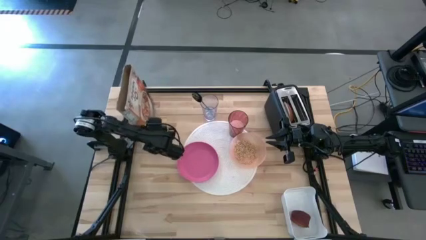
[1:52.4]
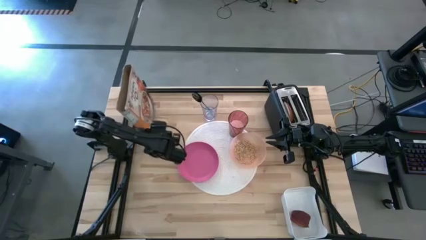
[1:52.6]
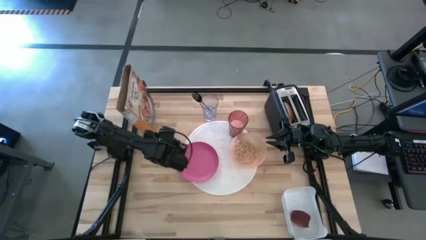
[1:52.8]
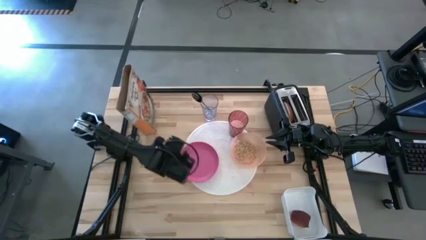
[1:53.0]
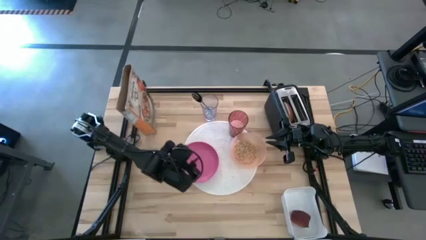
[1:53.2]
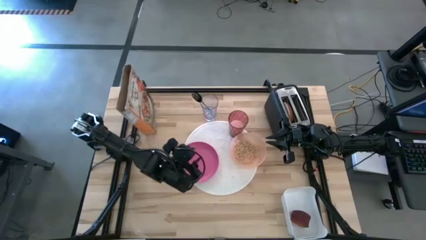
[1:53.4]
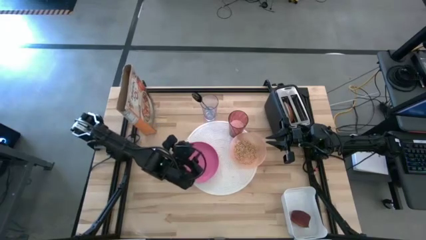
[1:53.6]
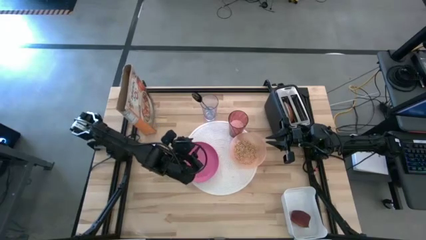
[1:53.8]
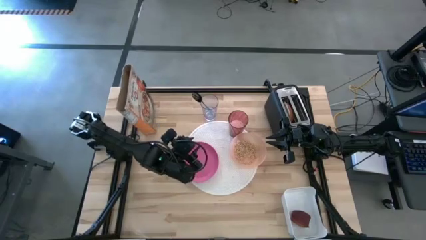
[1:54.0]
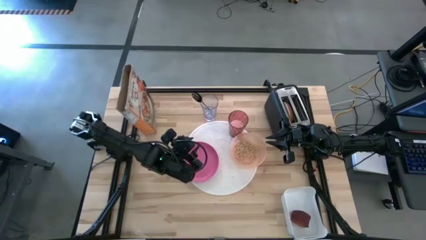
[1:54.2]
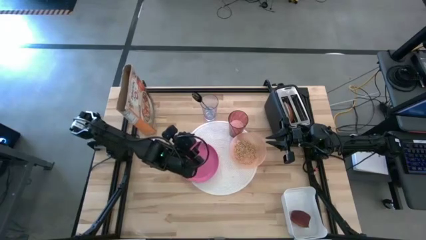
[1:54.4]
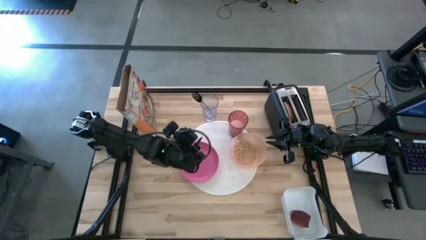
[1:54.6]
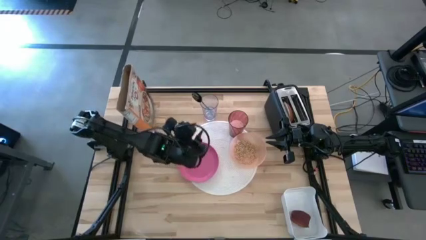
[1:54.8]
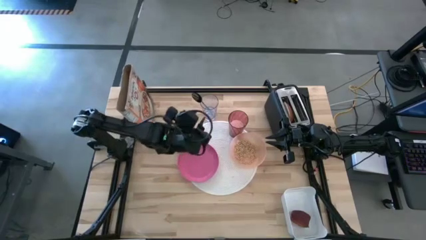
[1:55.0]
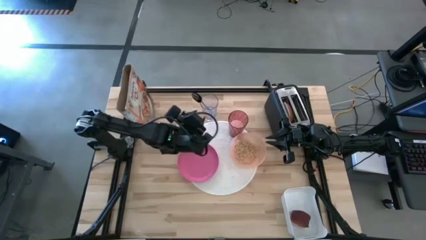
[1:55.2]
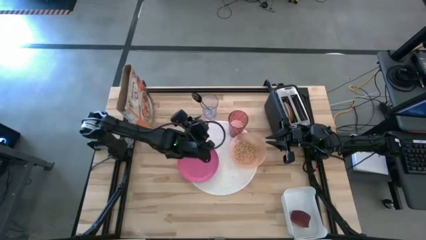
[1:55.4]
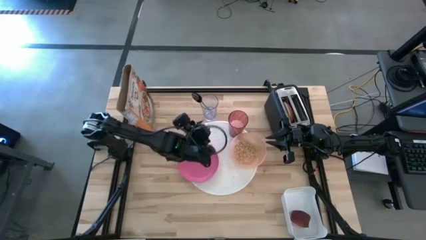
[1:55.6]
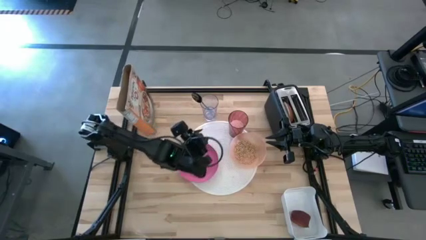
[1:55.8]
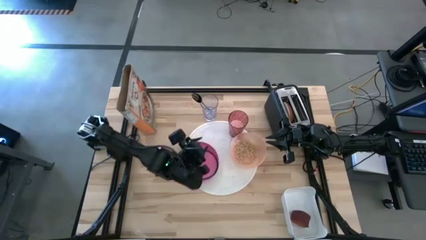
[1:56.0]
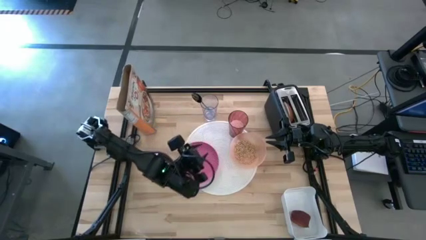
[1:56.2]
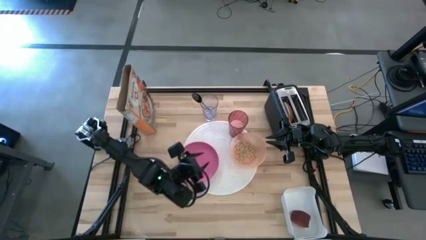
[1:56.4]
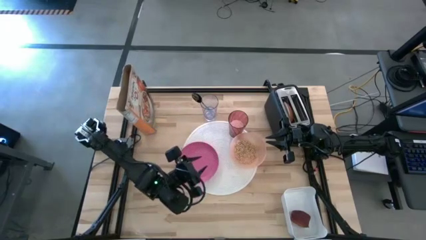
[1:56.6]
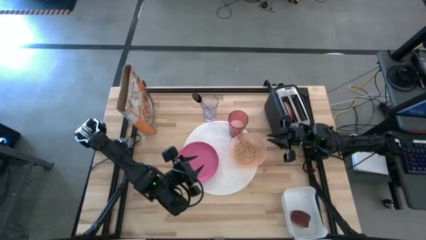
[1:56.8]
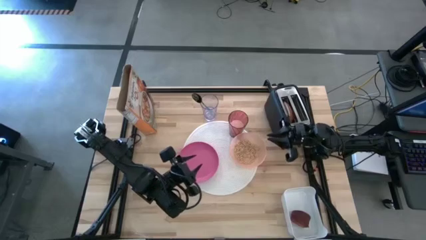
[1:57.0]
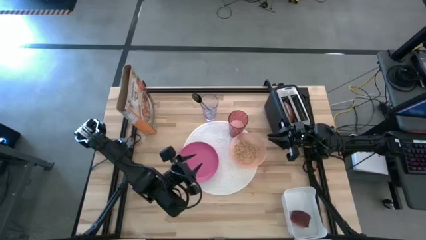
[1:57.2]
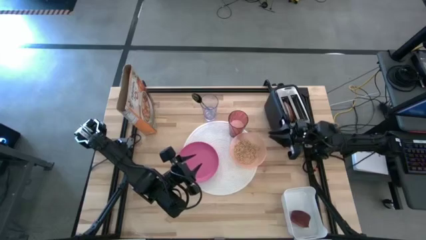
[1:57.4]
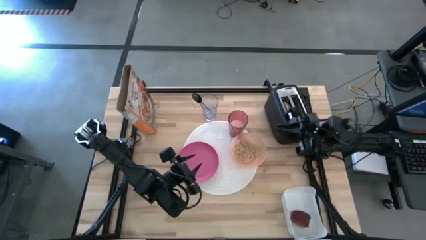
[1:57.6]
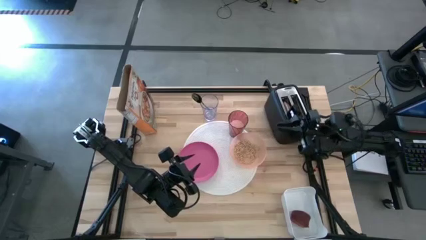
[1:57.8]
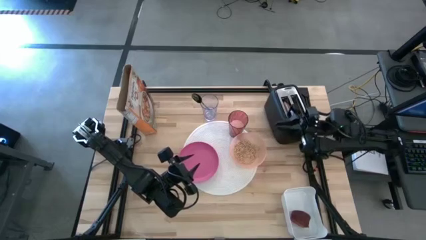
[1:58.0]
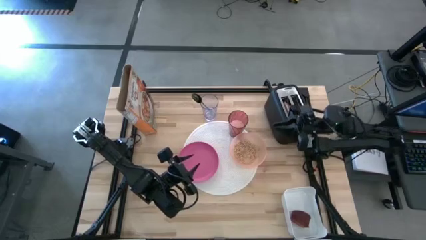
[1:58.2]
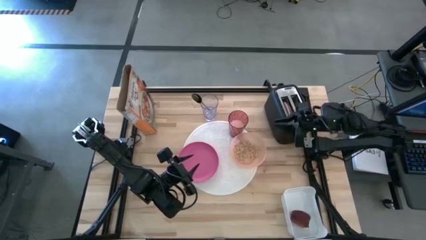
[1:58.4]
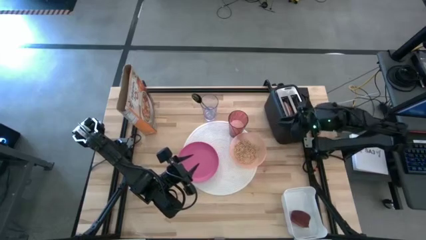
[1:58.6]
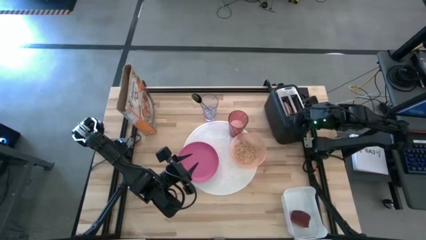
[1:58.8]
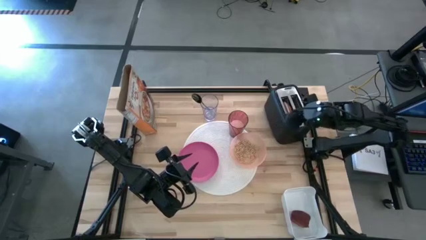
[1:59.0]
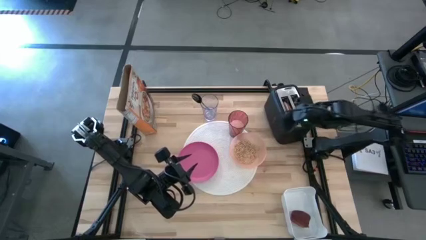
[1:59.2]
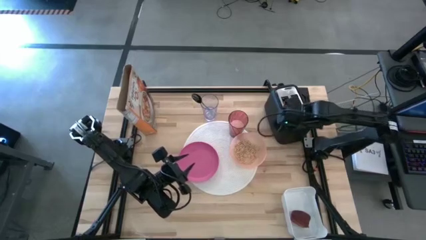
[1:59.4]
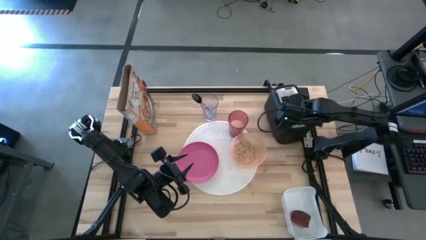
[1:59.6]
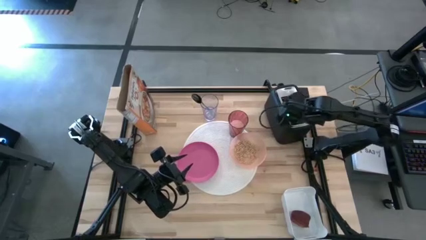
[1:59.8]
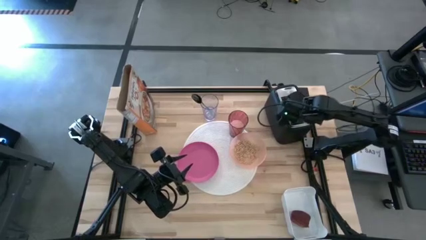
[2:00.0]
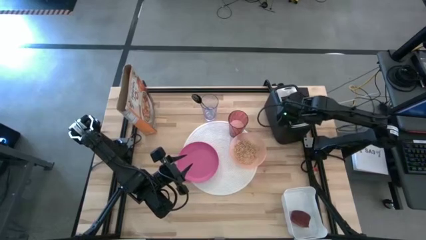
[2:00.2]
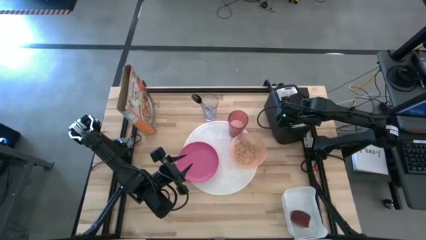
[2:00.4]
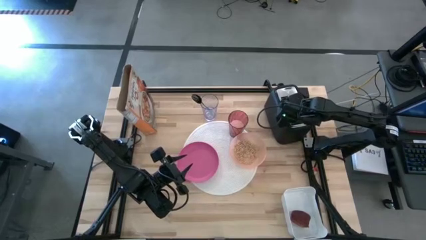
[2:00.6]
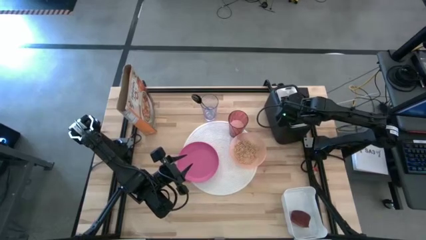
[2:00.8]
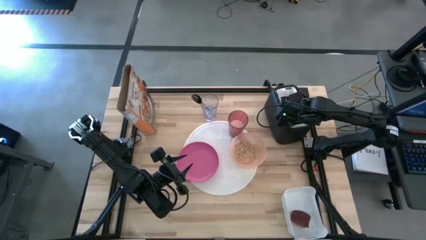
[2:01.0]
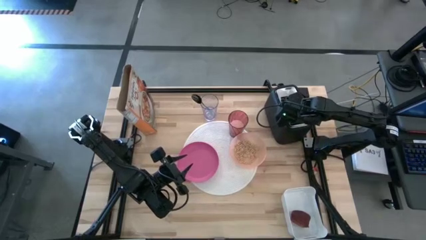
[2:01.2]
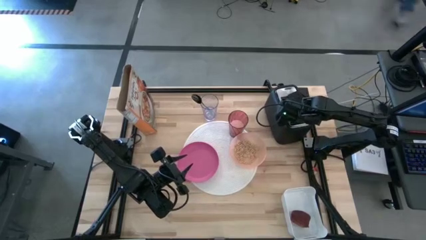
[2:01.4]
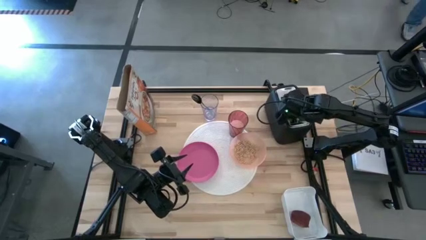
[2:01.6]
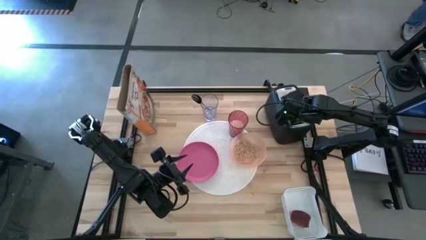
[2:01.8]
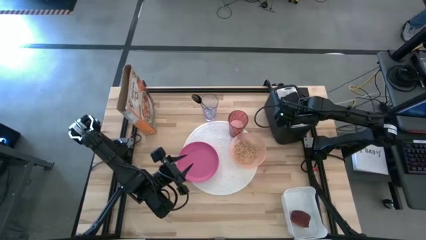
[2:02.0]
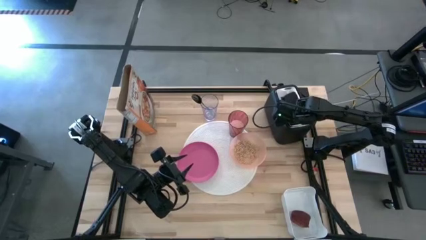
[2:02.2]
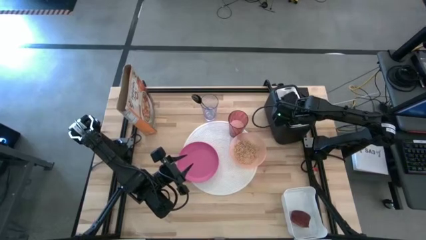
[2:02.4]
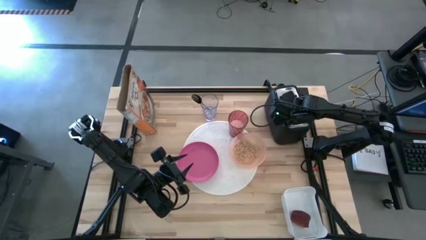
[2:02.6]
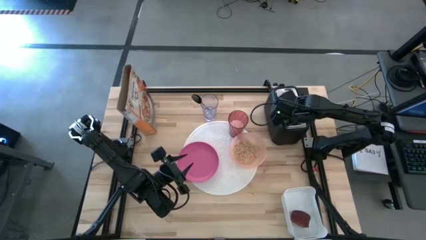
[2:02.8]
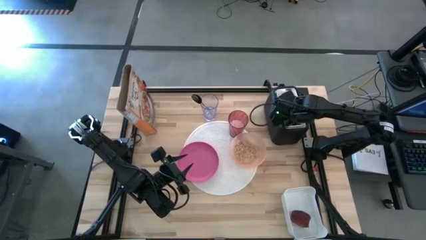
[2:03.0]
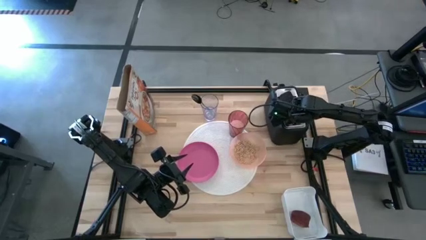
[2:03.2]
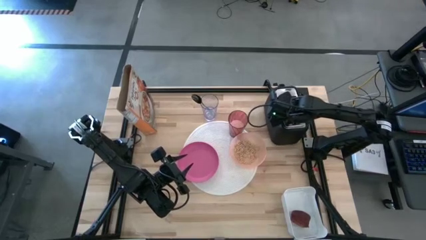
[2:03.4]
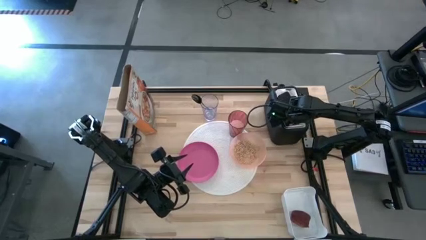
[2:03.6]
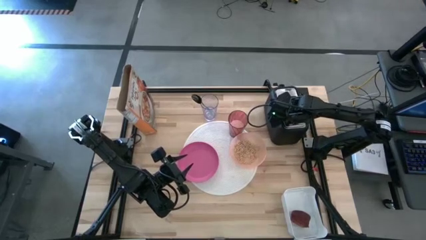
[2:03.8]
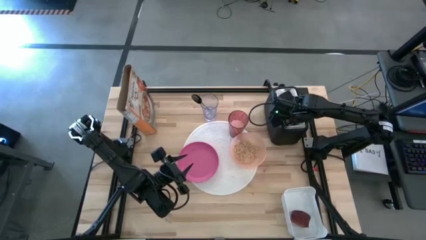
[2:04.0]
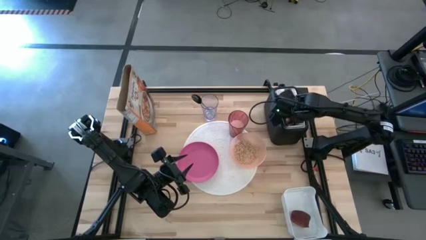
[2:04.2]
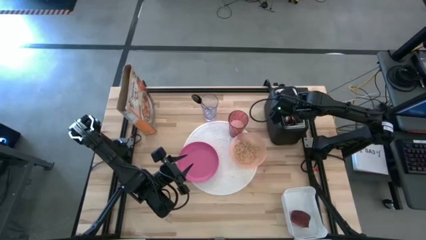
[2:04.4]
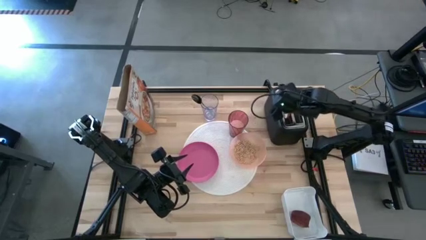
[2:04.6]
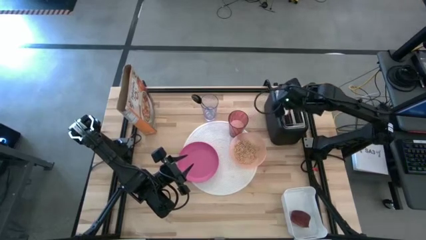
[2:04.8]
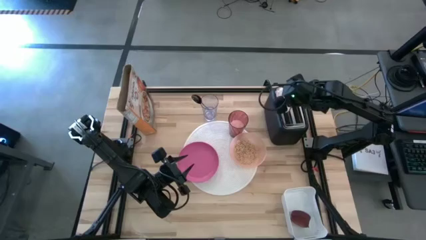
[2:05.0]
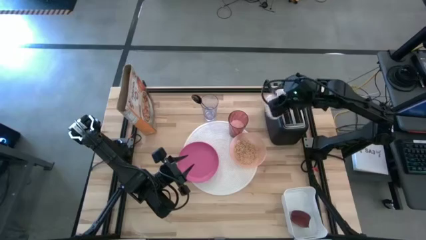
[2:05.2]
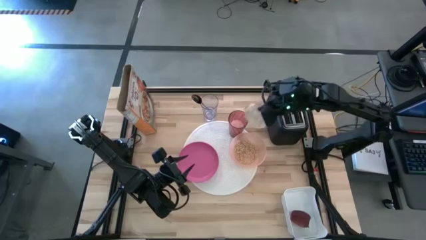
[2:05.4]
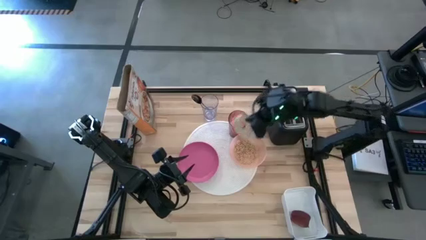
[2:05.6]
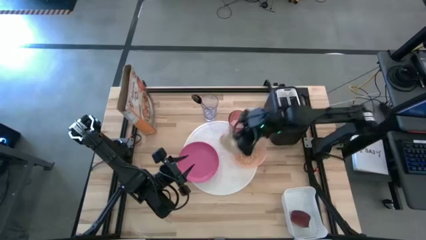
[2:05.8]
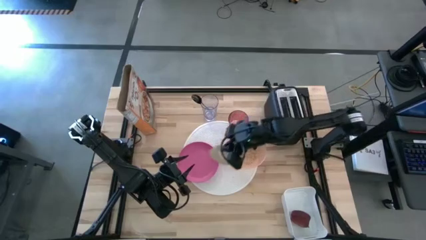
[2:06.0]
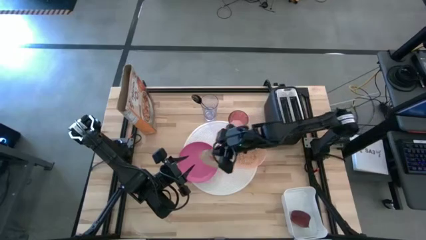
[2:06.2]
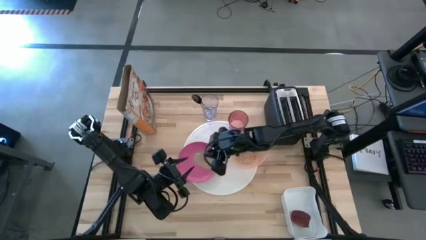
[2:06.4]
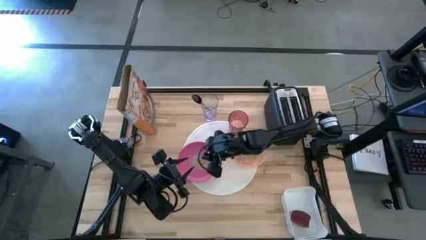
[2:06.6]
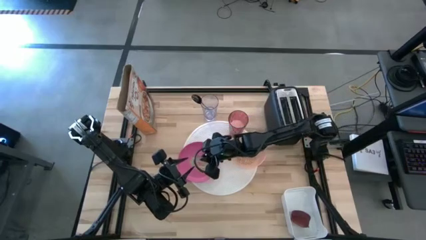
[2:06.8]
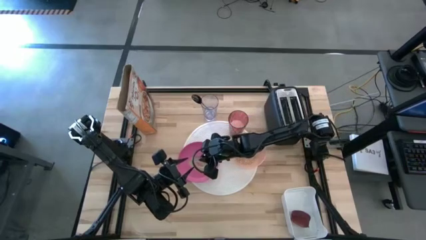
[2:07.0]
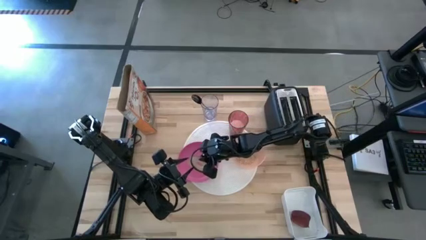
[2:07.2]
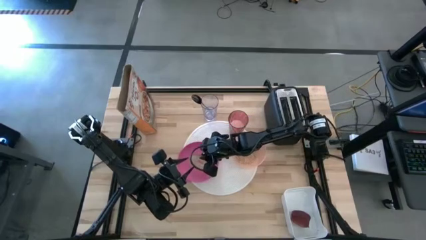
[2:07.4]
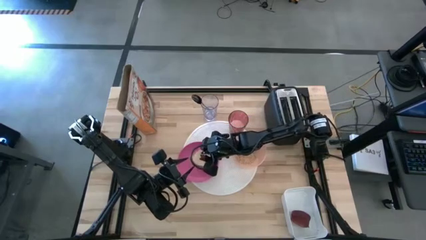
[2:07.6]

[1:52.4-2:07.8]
Task: Arrange a breakfast setting
Put the toasted bread on the pink plate
